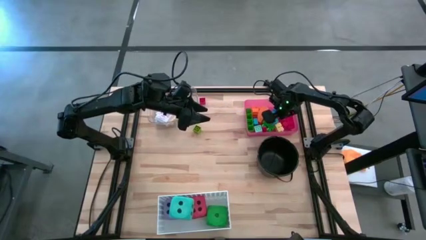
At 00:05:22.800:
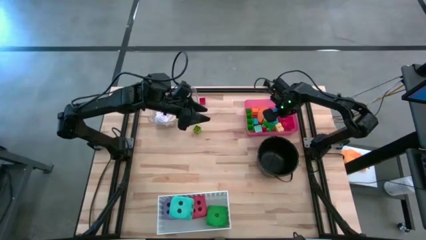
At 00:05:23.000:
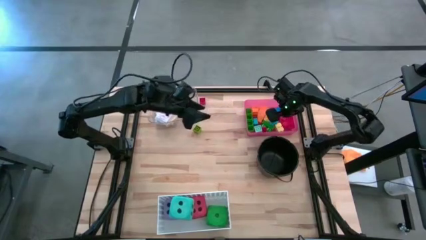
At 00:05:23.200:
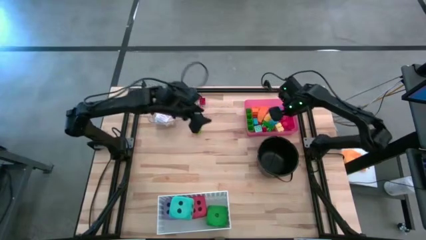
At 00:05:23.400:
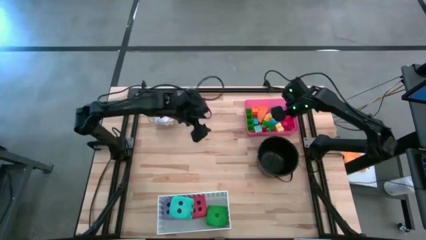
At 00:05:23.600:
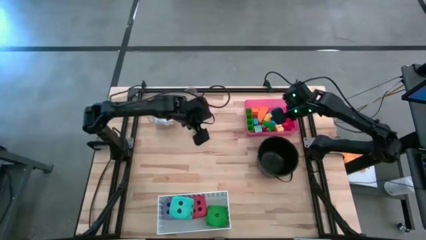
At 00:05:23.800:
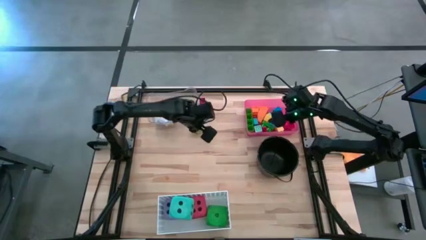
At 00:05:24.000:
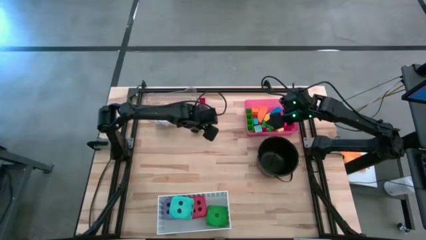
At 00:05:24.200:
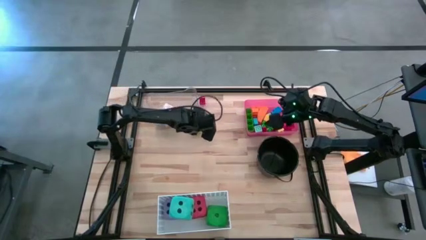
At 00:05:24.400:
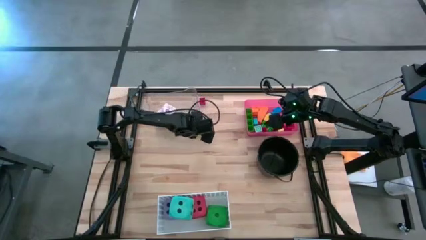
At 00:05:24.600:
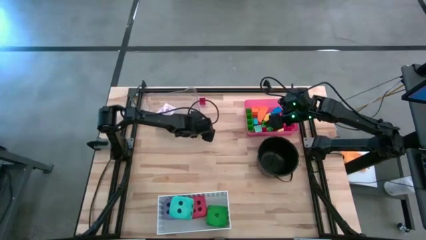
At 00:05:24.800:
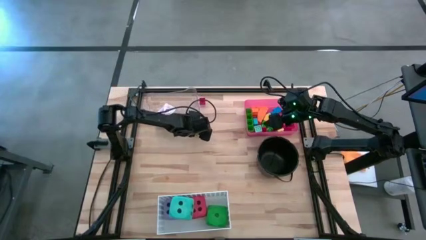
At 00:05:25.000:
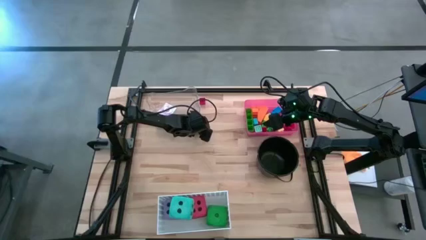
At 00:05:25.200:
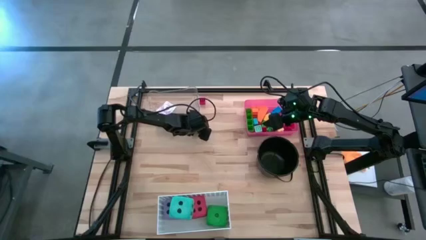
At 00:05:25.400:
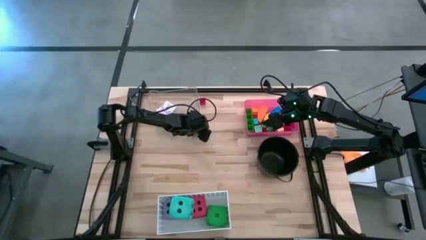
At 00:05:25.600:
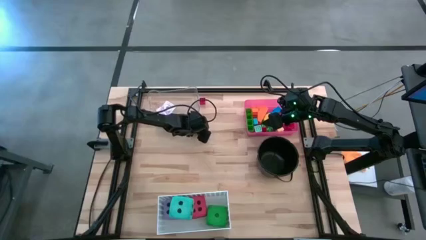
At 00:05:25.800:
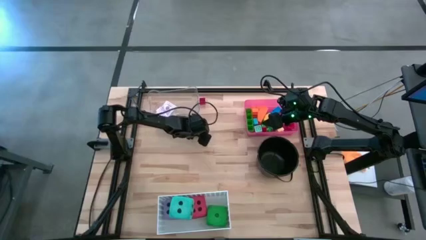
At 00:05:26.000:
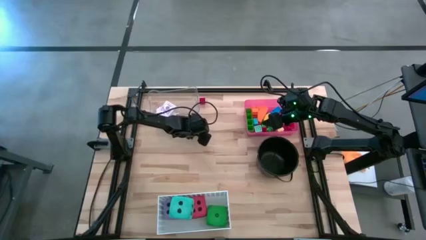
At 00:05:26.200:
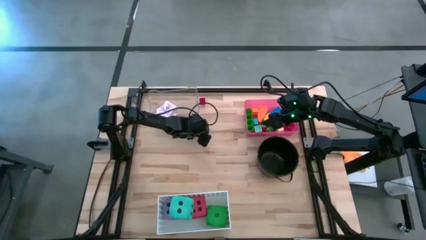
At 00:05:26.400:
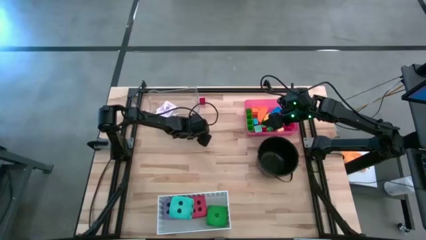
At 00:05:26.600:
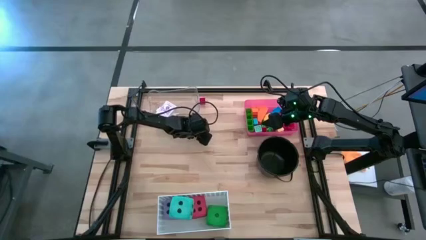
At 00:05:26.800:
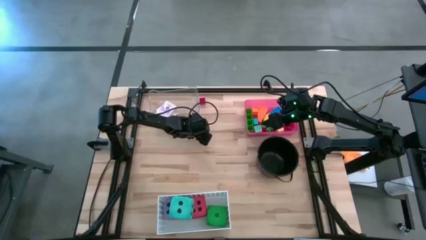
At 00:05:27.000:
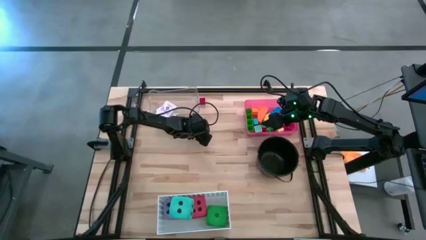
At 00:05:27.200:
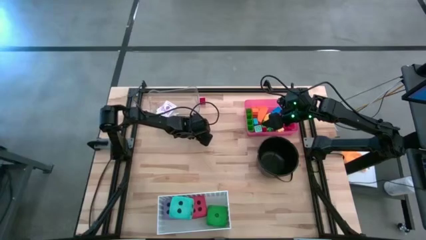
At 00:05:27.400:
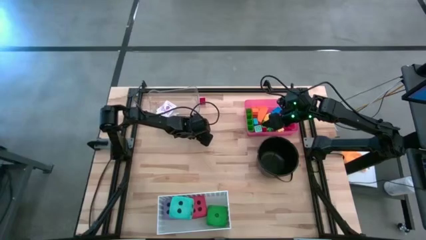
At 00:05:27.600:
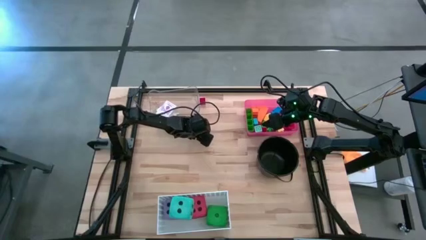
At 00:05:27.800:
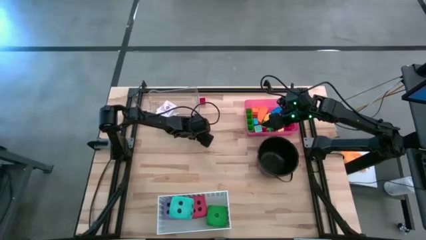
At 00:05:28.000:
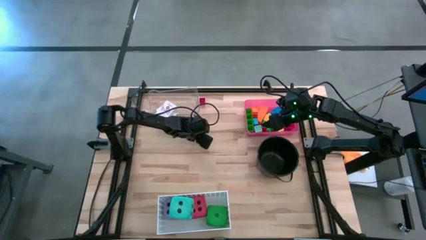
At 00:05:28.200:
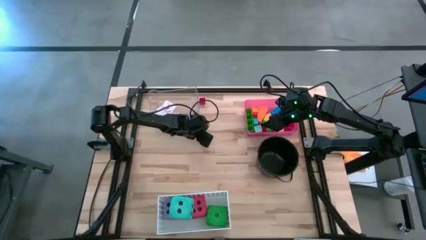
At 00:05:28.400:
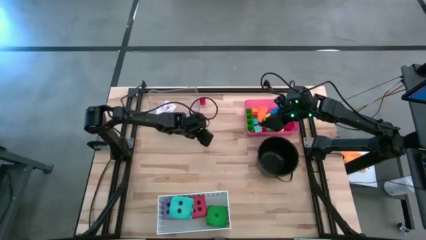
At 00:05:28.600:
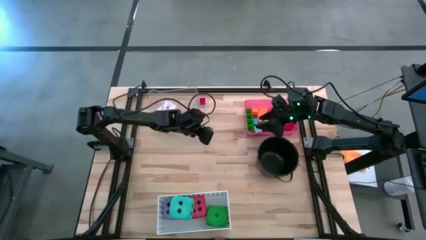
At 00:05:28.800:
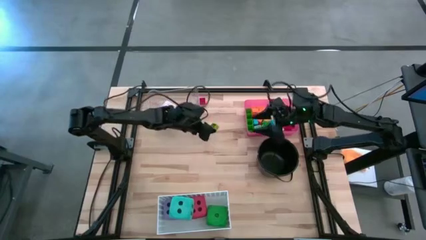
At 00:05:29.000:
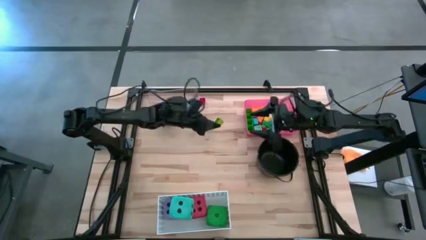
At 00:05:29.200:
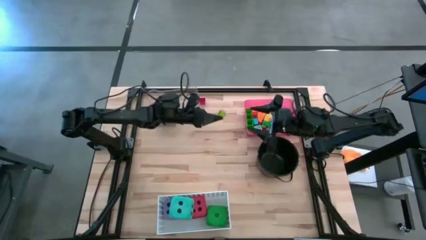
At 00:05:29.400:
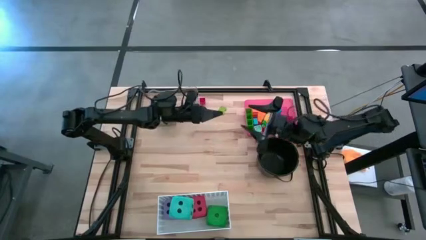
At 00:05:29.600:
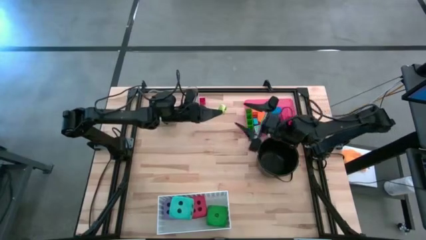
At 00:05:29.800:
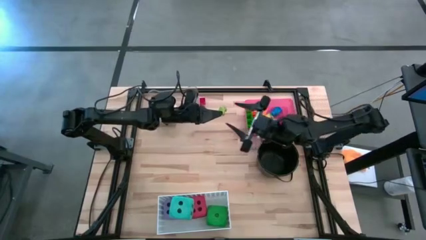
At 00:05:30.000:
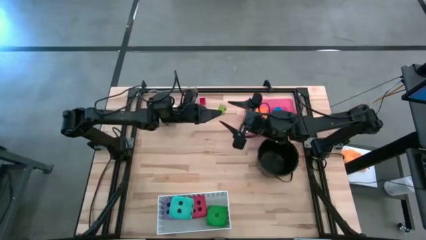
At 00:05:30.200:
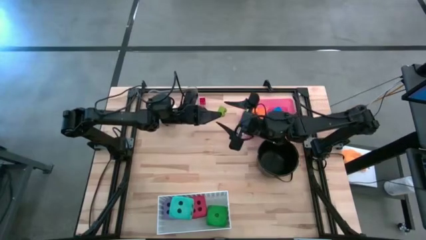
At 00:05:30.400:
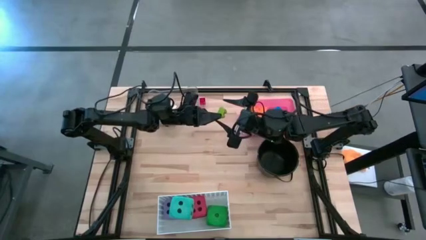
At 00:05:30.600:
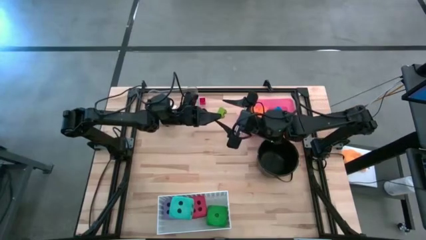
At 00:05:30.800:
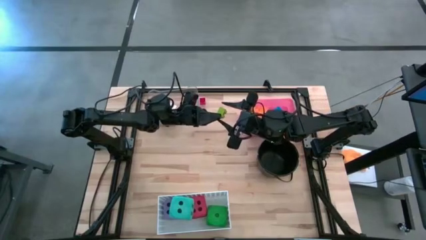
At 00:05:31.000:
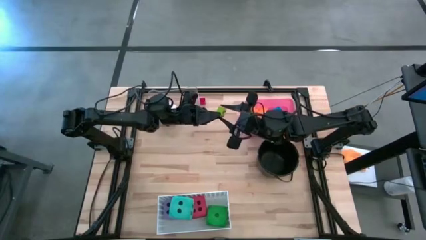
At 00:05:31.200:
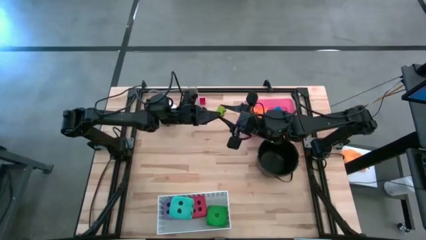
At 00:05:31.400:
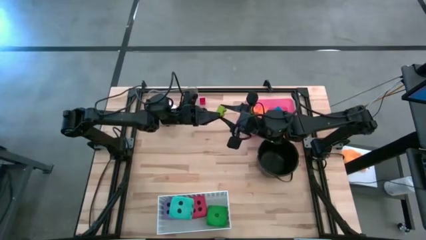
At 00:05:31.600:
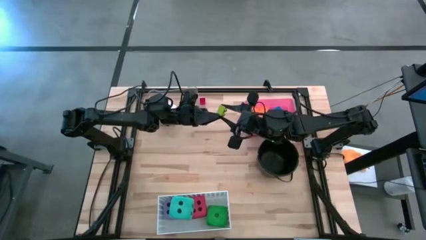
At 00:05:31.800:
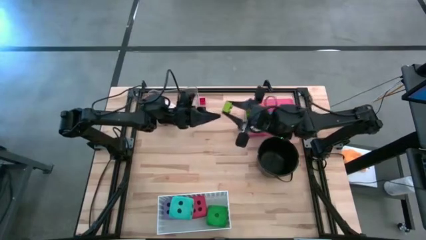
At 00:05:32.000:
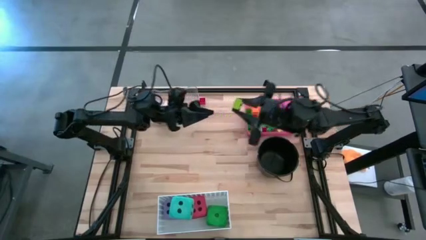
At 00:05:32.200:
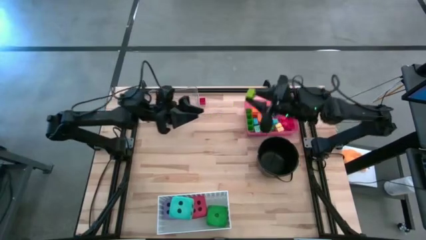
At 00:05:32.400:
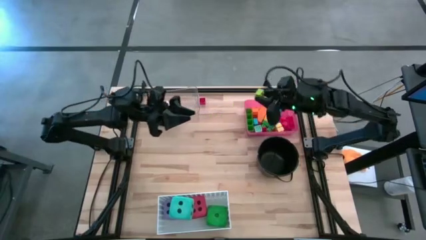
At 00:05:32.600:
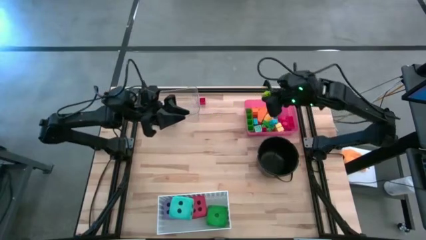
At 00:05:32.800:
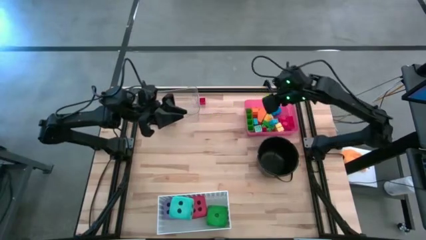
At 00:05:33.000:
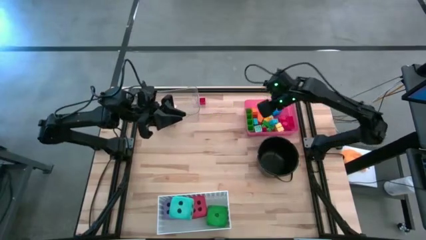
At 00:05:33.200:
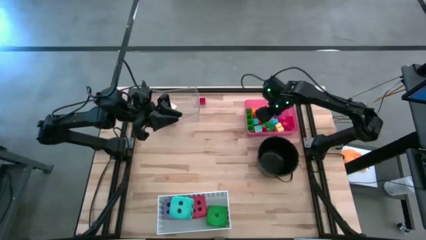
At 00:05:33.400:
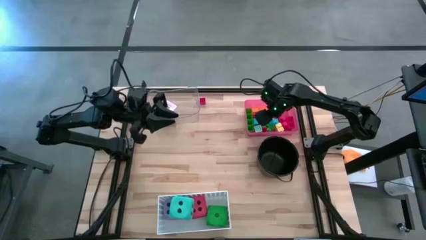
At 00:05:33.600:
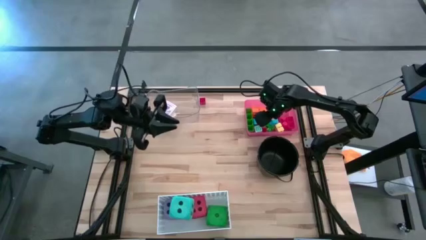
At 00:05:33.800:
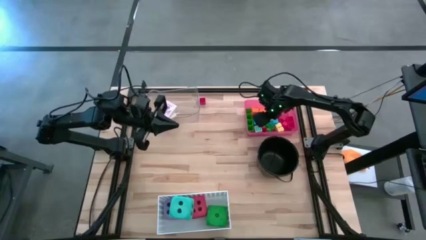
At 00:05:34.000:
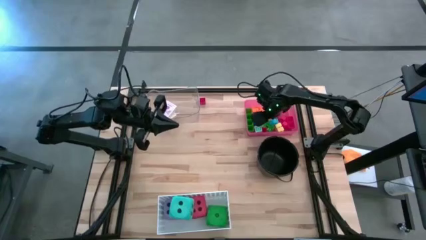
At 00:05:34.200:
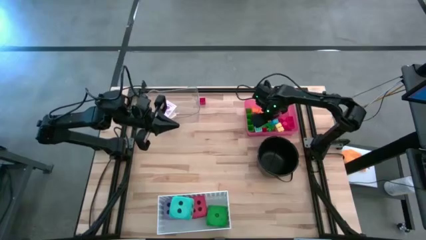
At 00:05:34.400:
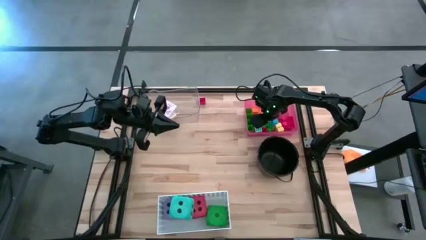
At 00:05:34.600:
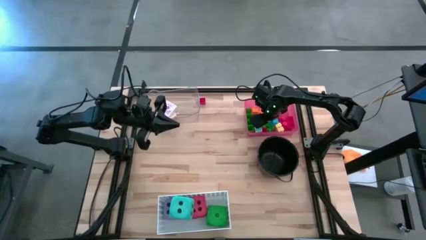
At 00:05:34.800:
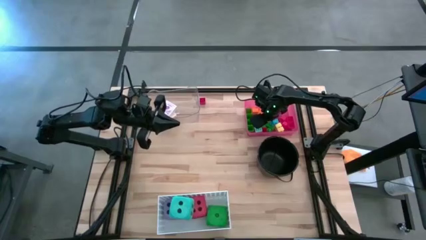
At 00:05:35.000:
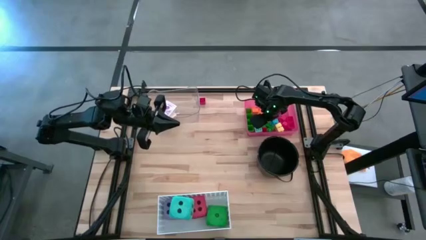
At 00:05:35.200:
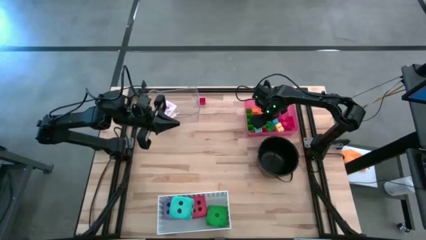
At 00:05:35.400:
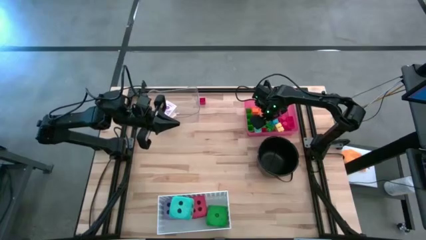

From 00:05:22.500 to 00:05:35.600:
Task: Pick & Place Toys
Put the green game piece into the red bin

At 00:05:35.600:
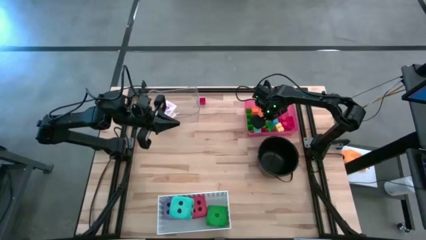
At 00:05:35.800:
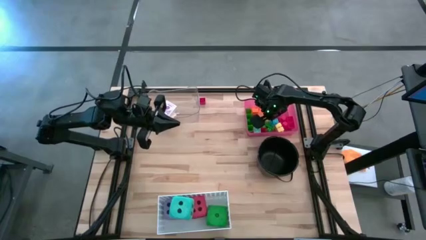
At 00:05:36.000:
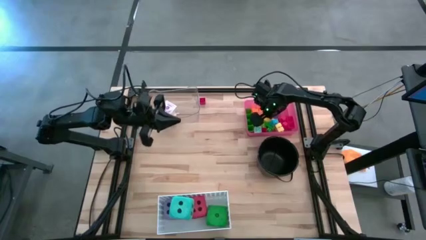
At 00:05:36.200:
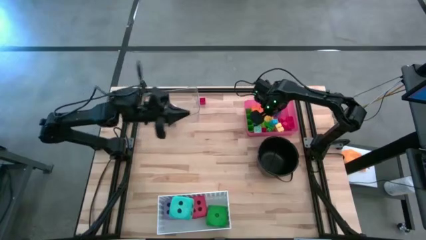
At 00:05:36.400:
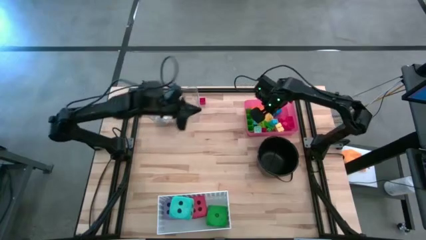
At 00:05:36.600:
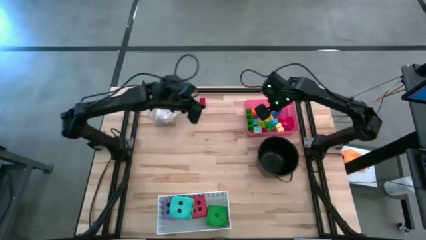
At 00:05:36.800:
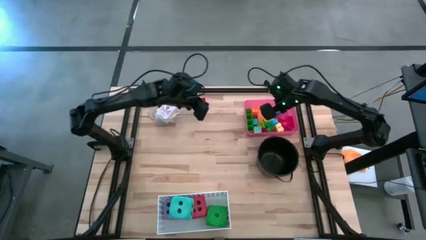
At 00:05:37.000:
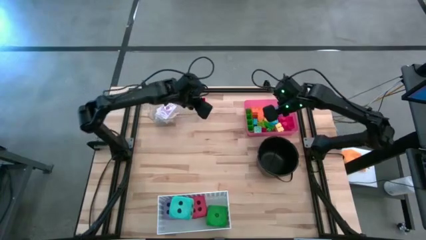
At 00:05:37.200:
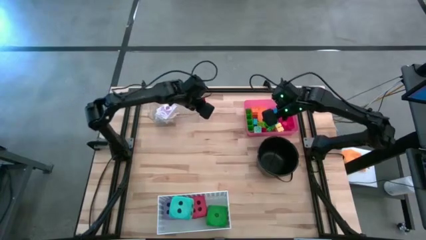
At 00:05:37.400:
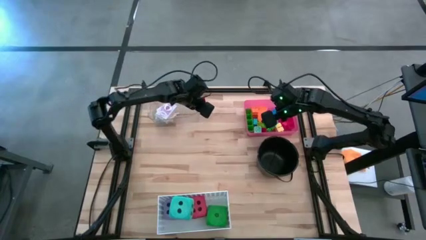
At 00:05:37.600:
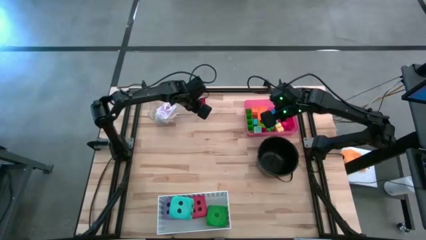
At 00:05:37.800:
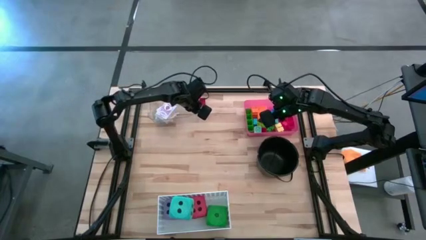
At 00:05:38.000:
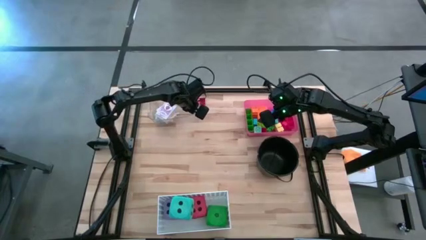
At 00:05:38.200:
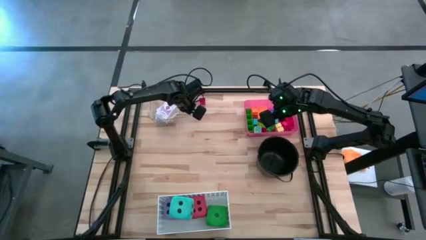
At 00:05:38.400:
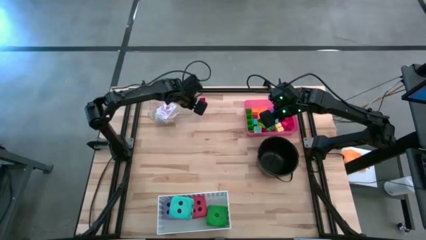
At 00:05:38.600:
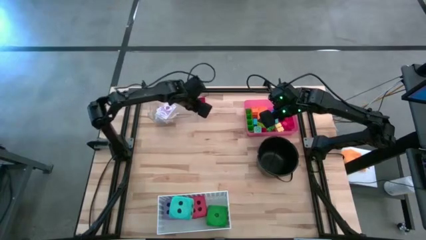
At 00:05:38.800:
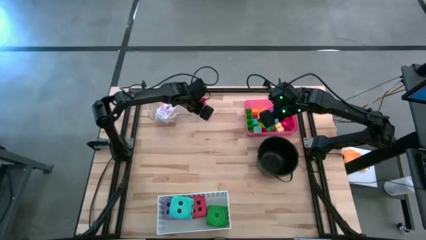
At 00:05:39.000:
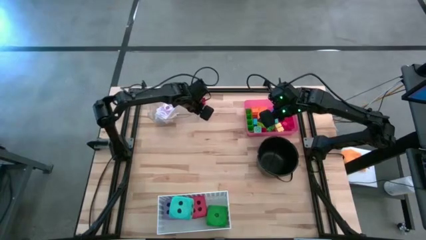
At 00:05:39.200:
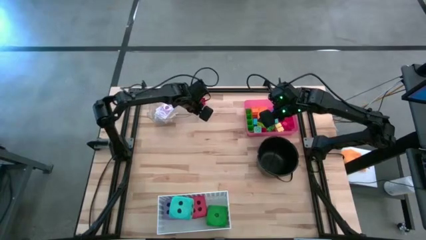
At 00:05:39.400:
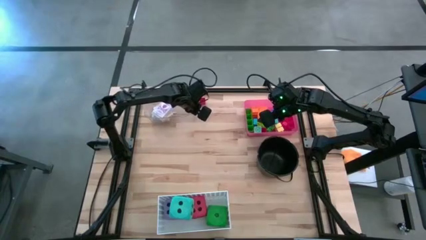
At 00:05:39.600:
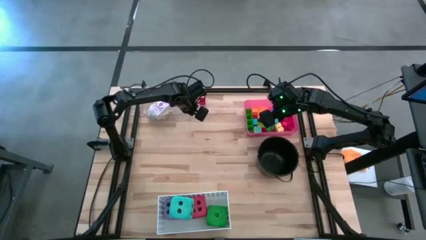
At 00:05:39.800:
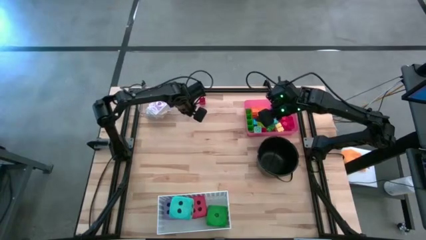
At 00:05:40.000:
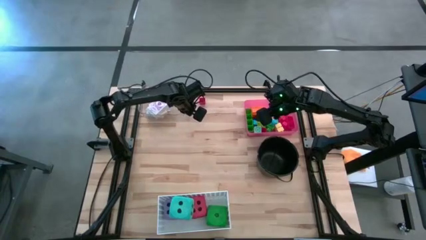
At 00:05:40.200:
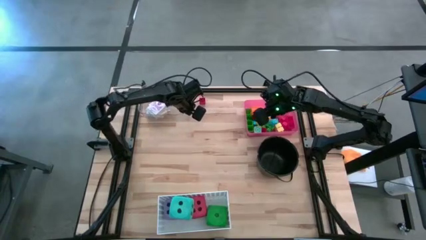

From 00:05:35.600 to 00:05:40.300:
Adjust the transparent bin
